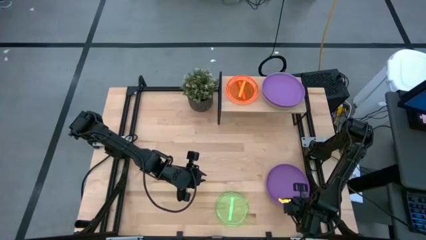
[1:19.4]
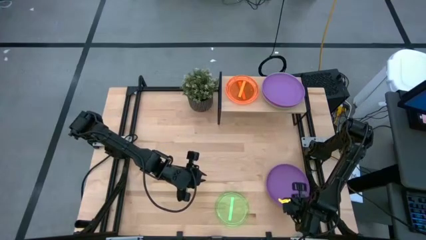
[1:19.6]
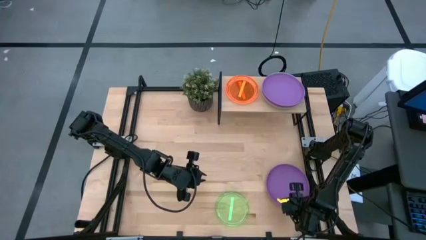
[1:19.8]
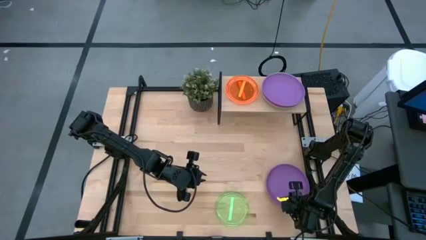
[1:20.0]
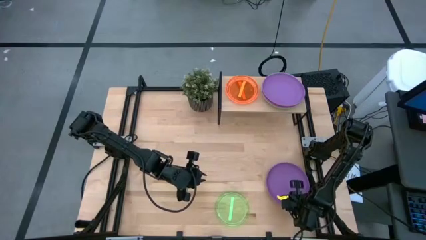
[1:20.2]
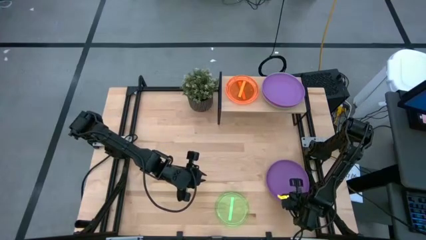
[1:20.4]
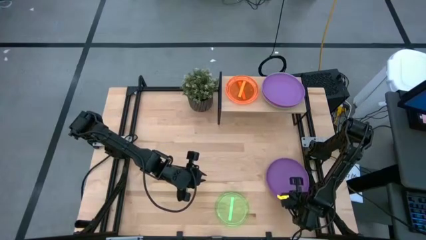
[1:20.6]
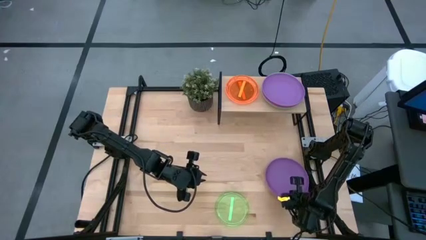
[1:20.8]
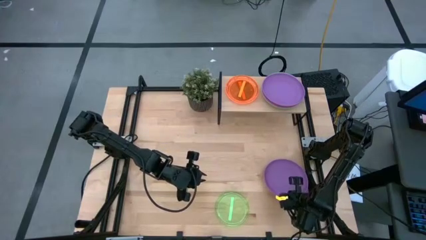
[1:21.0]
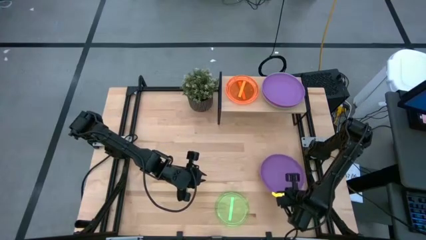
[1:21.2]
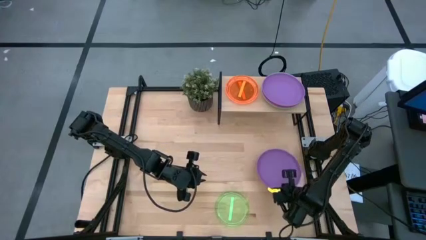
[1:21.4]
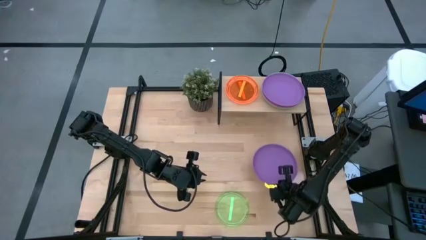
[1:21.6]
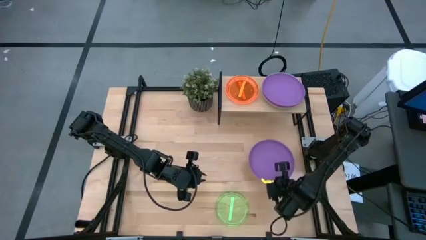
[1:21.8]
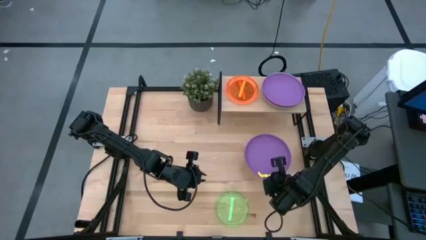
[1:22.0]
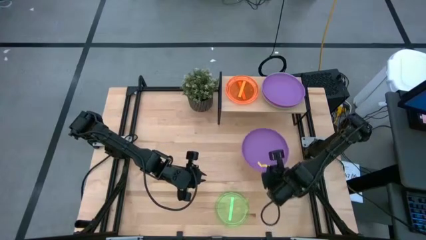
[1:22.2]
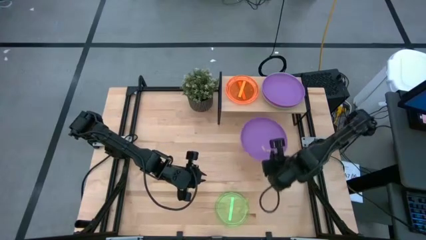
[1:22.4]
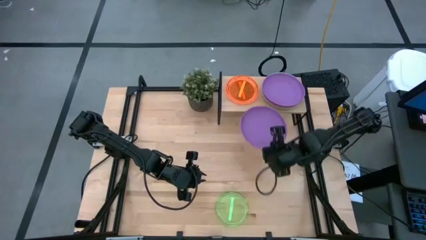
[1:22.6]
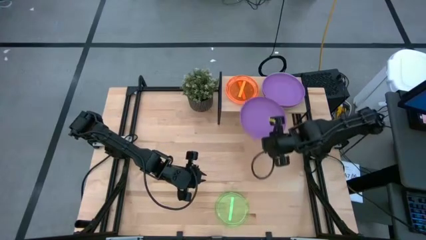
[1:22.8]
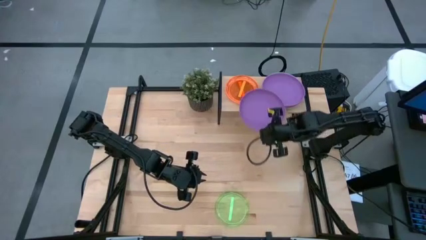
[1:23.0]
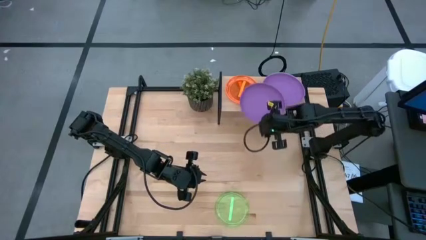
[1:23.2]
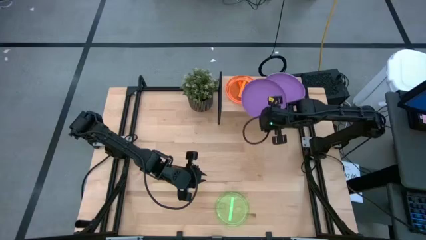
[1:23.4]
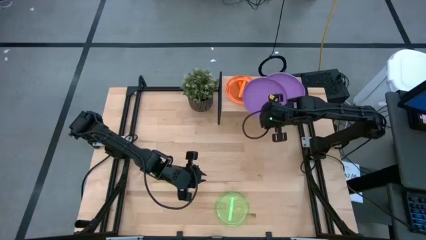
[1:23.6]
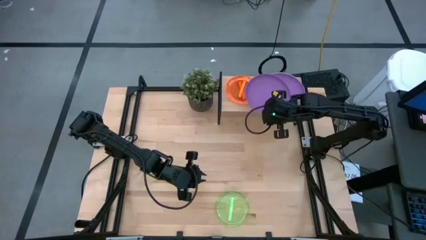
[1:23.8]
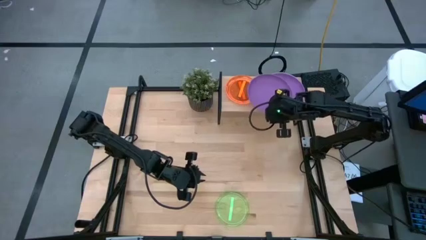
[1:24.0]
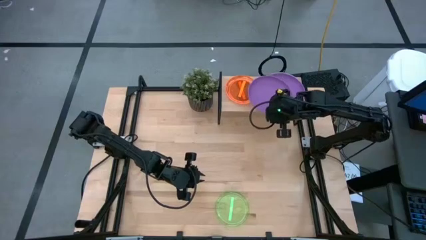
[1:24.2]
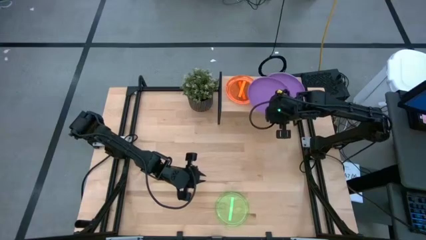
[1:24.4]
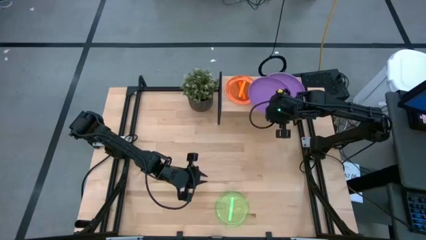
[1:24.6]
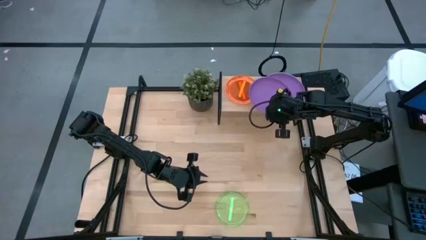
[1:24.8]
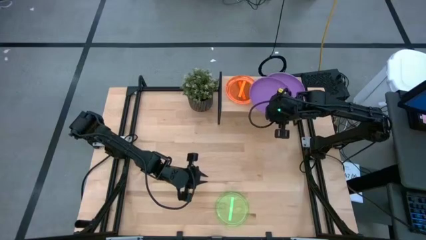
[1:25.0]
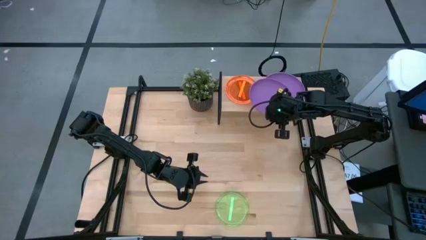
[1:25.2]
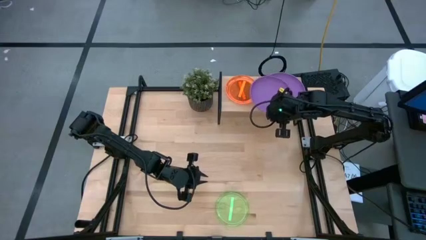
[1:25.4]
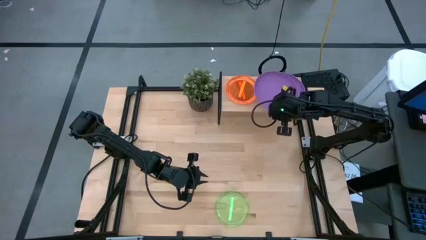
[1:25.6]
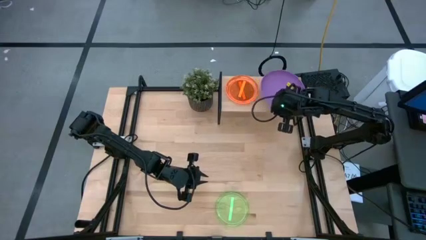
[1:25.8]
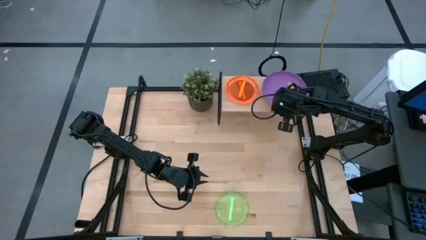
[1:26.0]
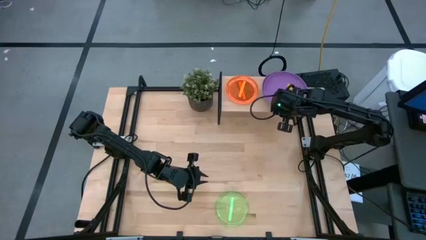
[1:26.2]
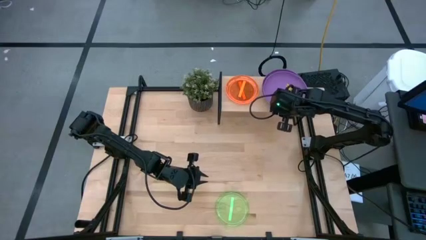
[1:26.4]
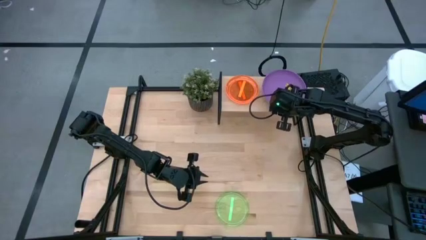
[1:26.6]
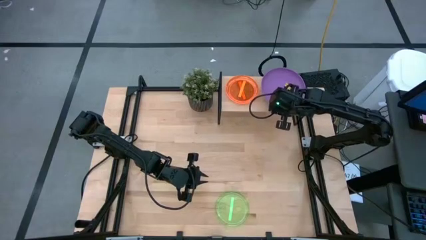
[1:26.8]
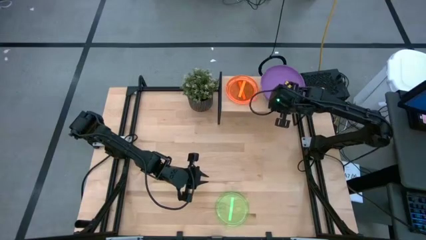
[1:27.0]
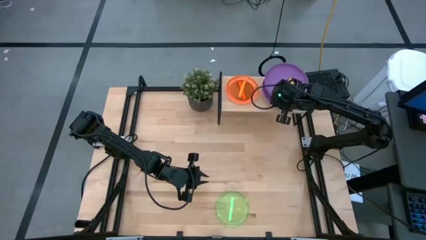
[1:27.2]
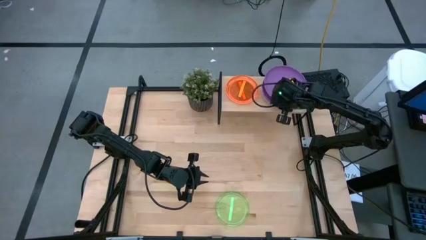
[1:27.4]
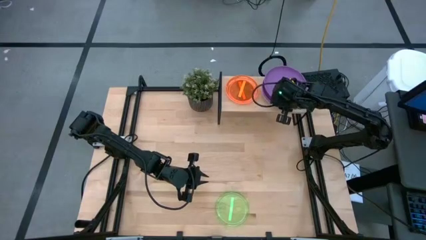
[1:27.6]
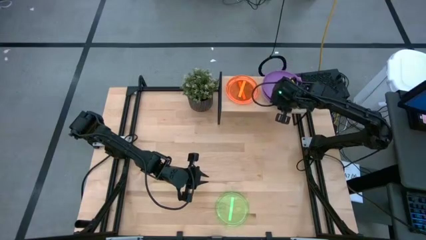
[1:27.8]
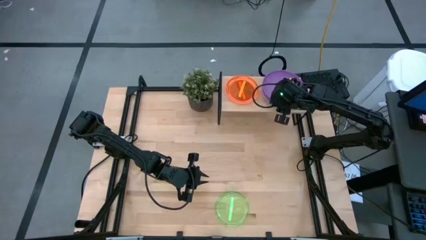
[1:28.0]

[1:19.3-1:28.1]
Task: Place and stack plates onto a shelf
Stack the purple plate on top of the purple plate on the shelf

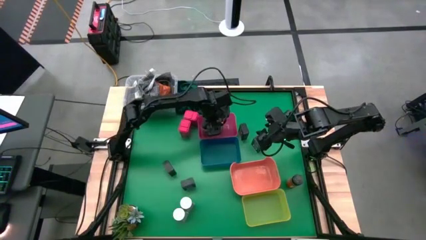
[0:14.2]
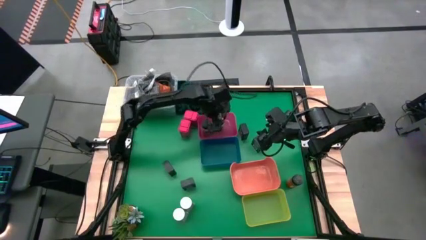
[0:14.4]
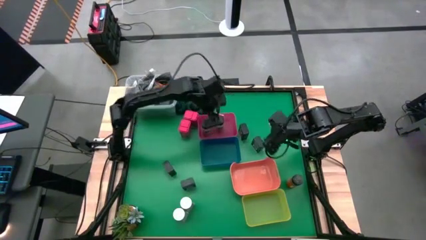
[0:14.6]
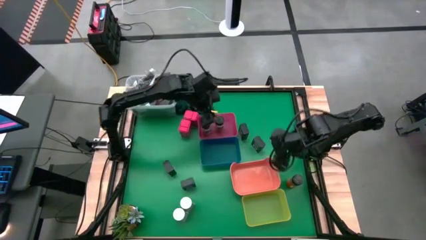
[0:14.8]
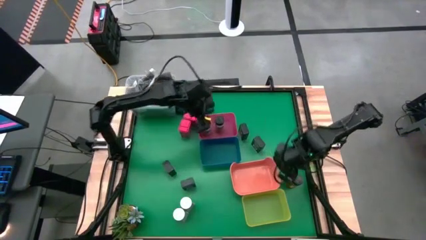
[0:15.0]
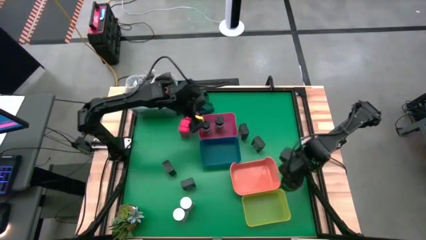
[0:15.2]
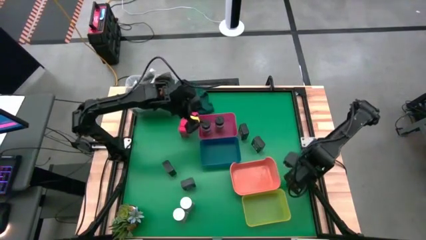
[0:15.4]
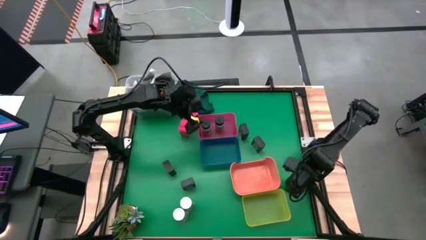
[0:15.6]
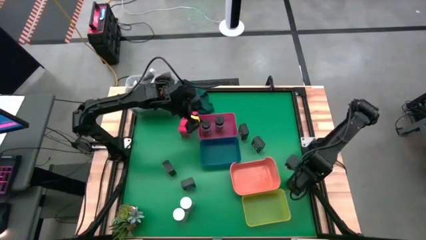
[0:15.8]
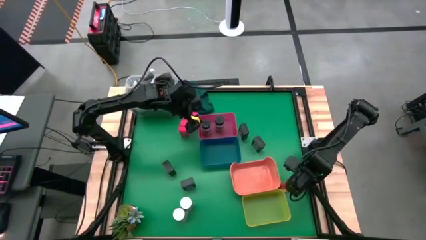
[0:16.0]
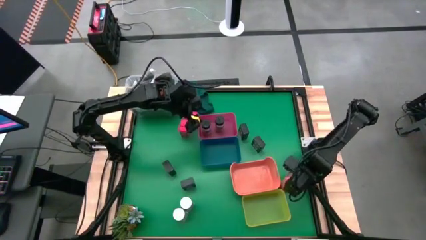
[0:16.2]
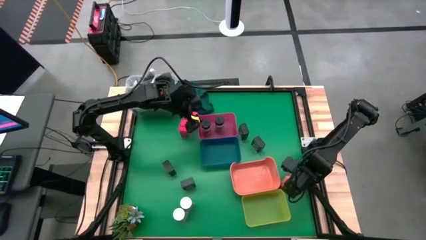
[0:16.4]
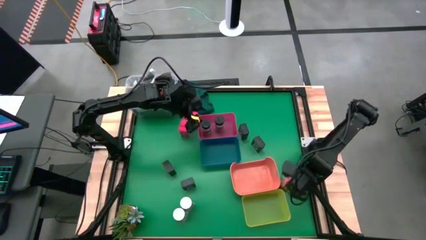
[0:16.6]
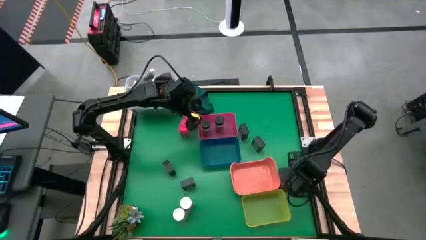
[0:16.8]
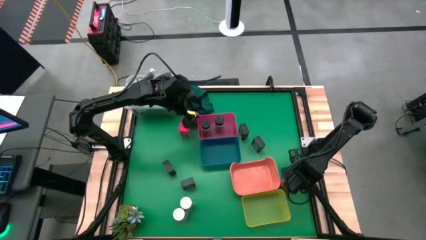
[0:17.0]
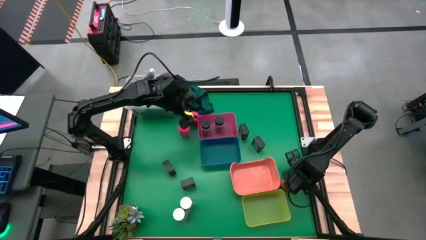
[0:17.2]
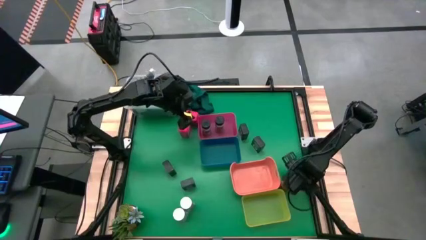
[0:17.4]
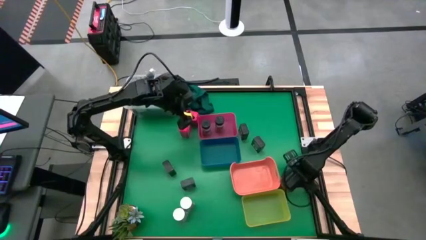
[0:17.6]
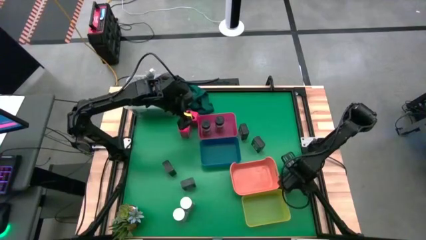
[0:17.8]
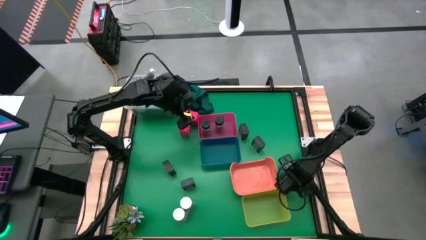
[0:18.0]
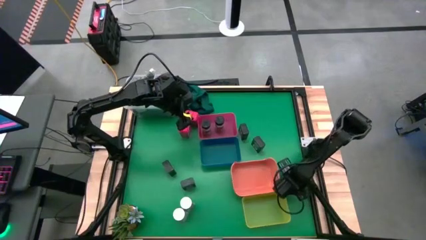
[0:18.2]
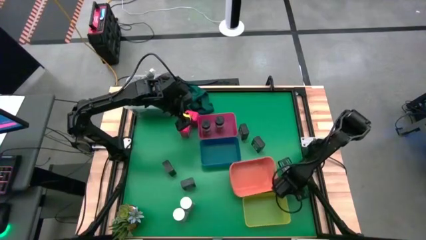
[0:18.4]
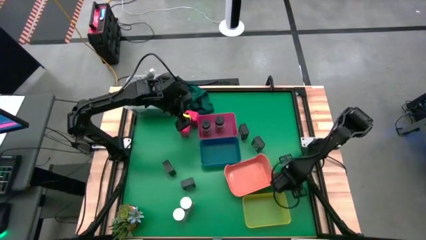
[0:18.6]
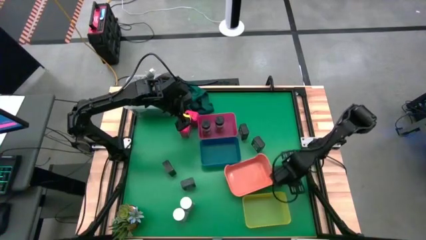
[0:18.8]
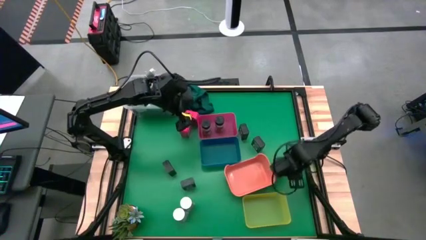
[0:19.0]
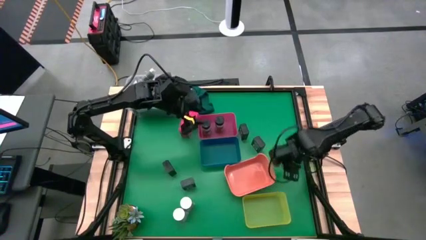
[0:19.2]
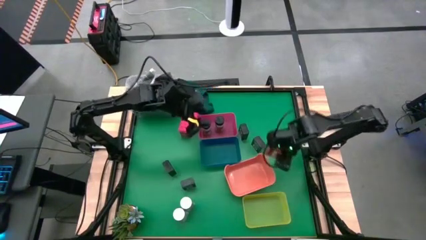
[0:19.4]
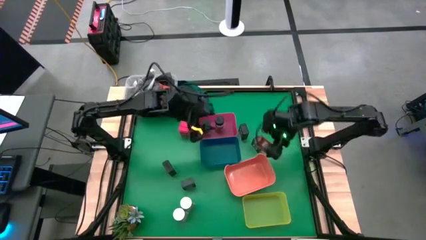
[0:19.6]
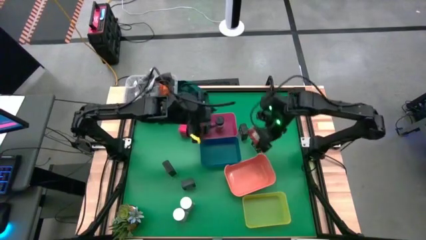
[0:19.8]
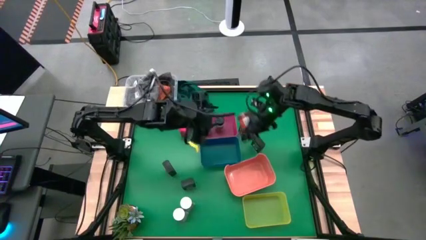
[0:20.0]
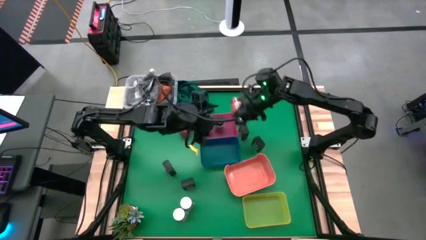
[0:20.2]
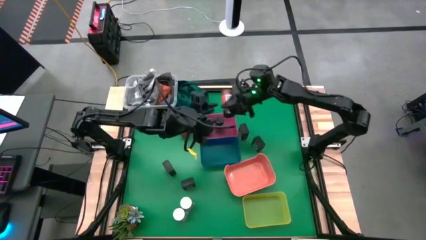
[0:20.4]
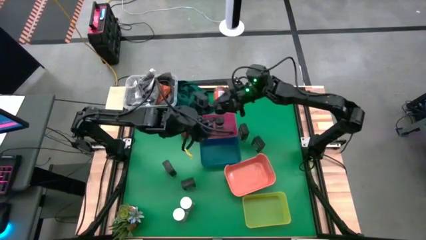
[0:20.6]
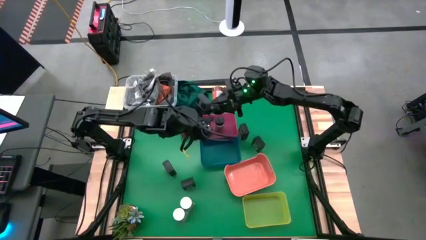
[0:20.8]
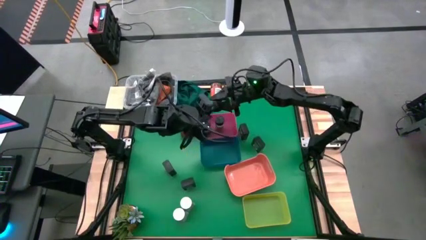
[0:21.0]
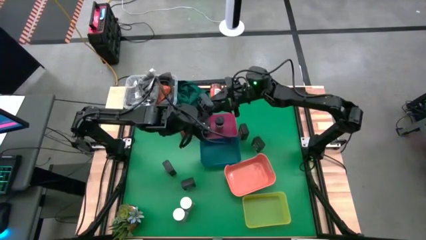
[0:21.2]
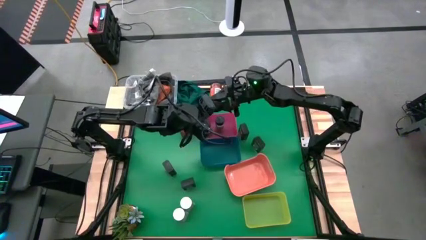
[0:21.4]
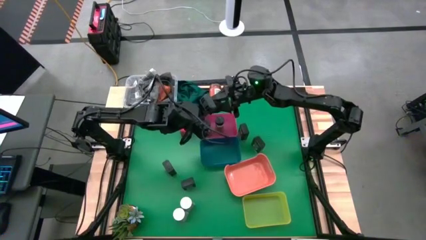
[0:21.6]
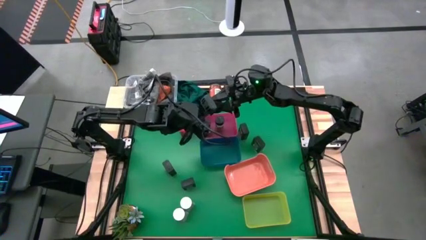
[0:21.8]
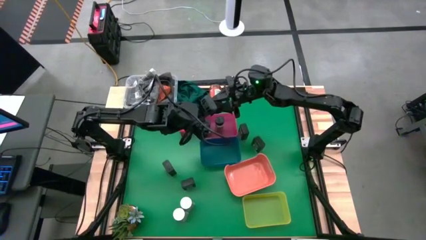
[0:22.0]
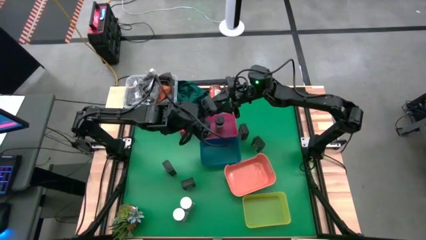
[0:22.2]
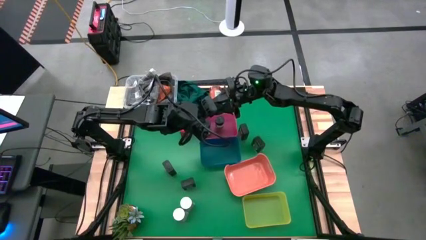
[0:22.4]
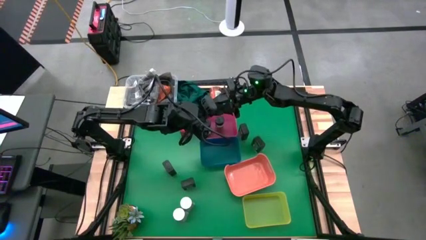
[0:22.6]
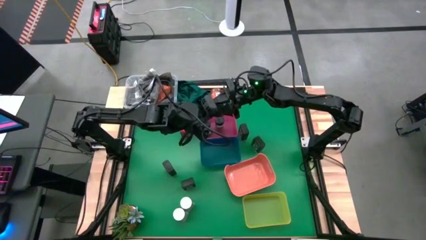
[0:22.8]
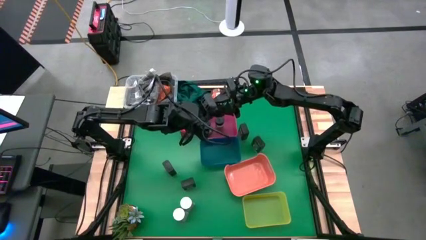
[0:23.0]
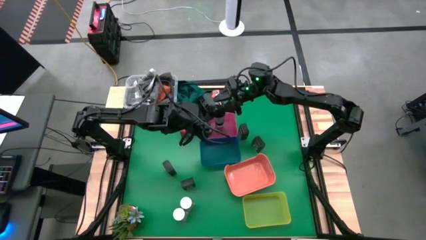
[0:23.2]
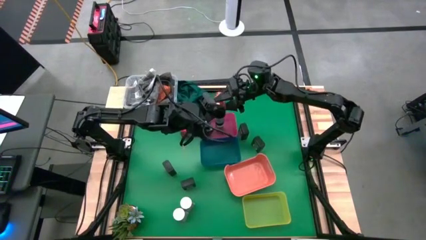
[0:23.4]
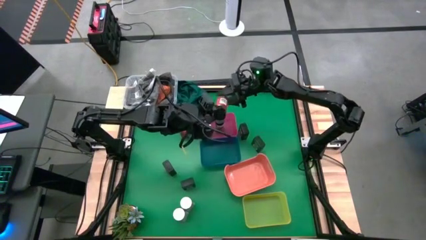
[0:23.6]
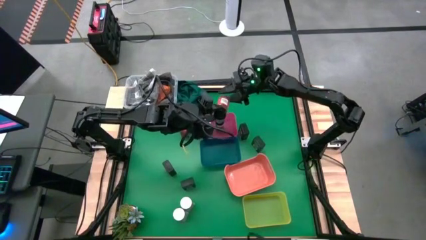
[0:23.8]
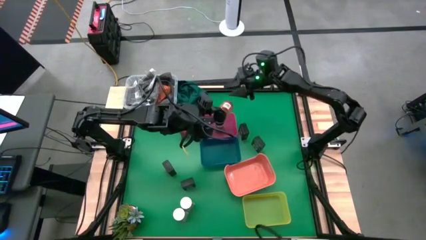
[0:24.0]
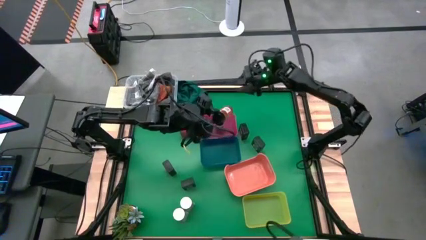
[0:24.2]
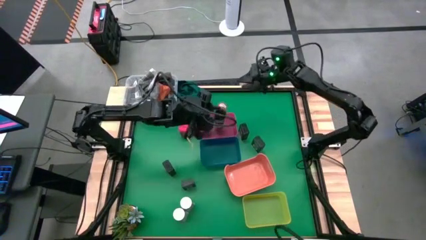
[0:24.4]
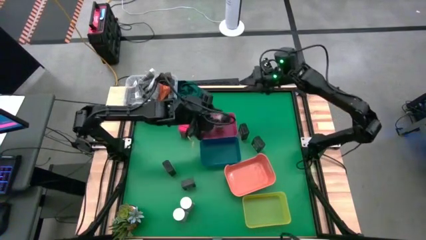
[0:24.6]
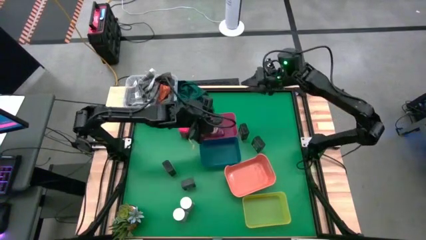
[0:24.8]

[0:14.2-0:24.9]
Task: Sort spices by type
Put the black seasoning bottle into the pink bin
